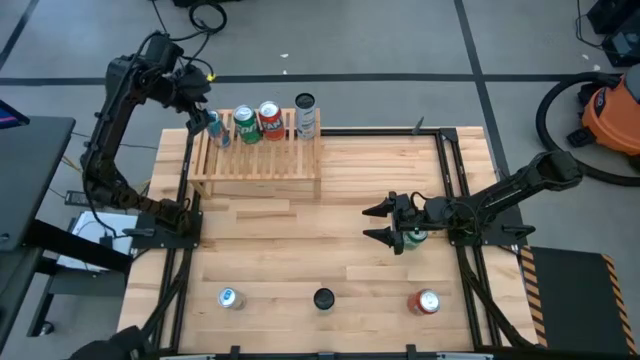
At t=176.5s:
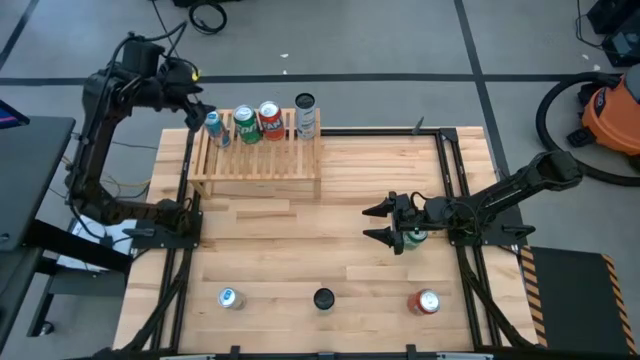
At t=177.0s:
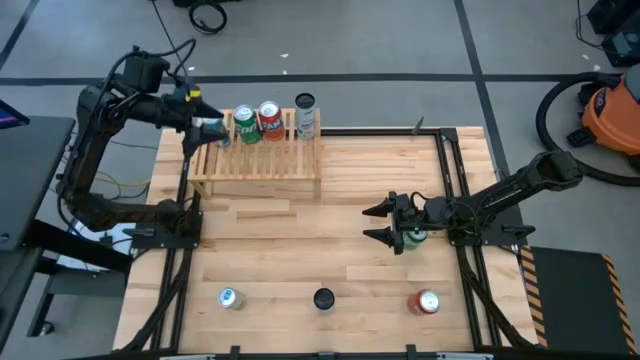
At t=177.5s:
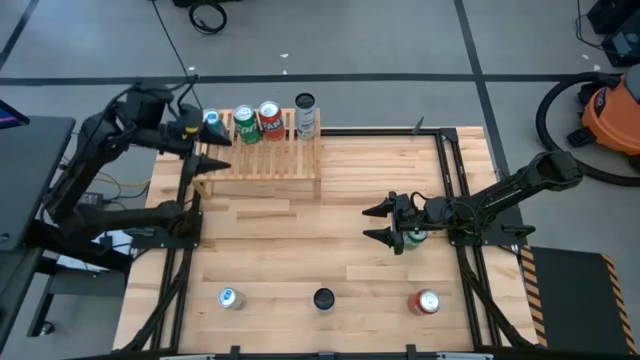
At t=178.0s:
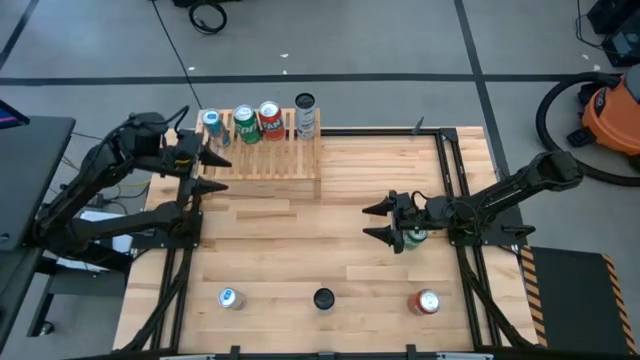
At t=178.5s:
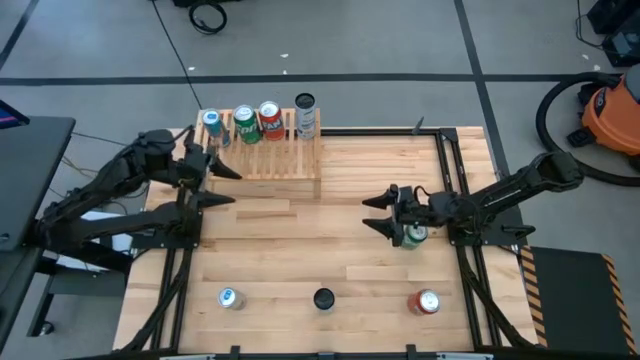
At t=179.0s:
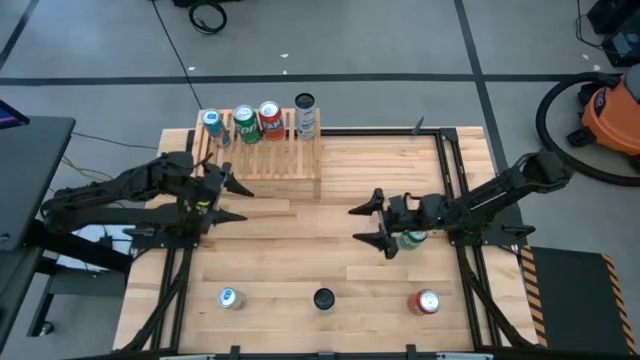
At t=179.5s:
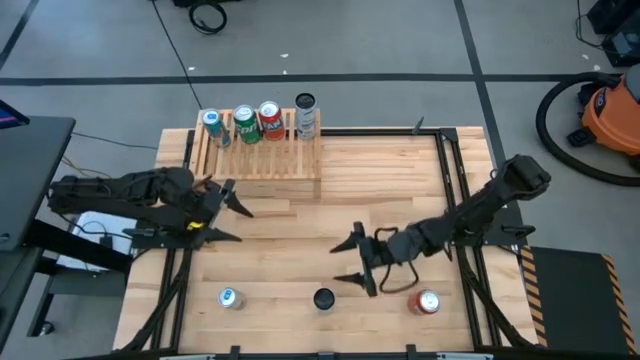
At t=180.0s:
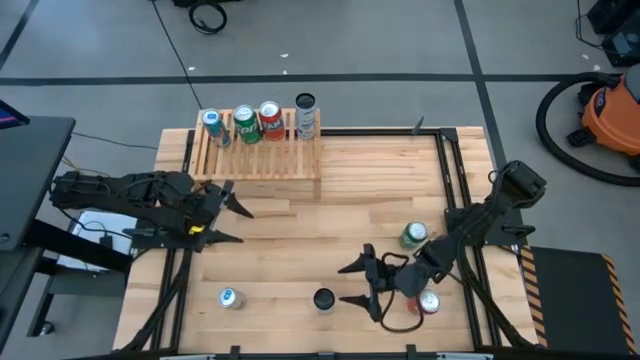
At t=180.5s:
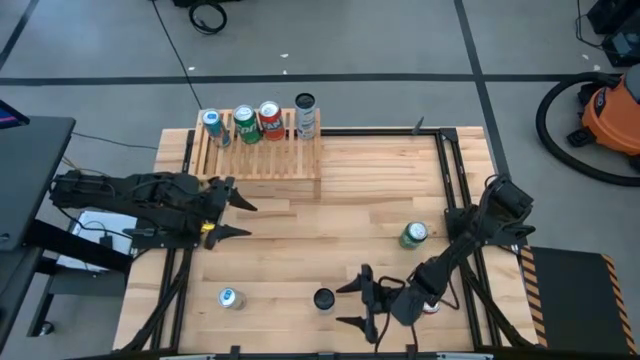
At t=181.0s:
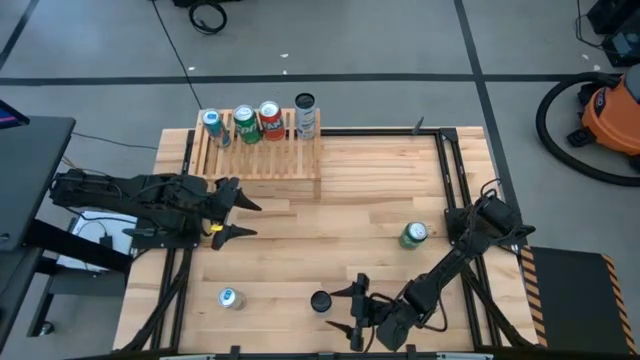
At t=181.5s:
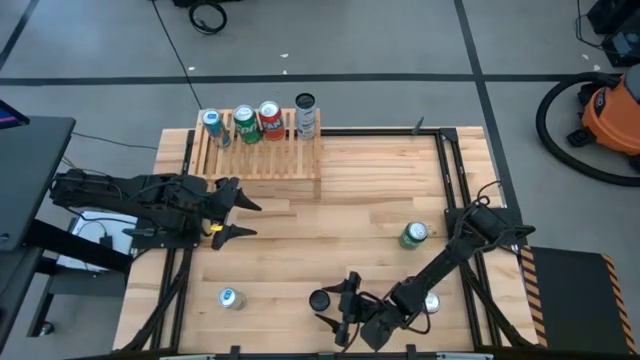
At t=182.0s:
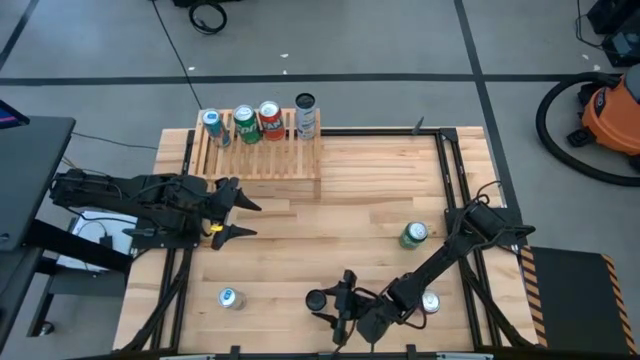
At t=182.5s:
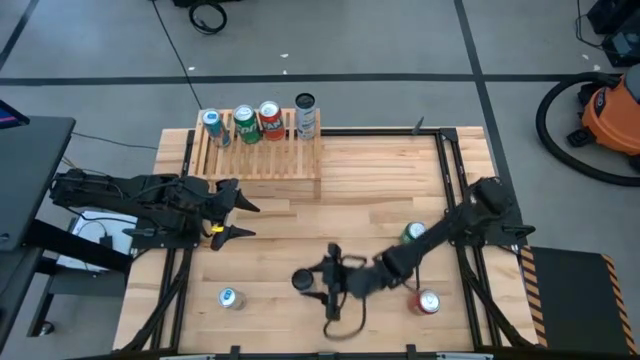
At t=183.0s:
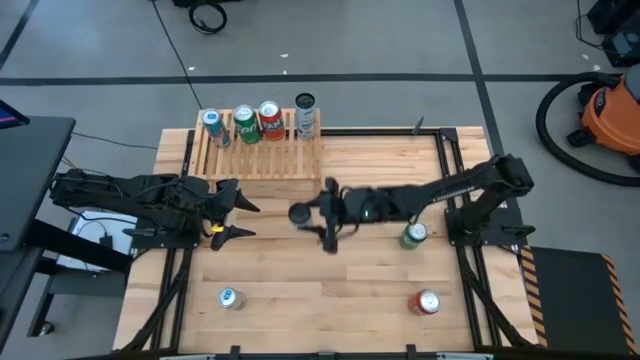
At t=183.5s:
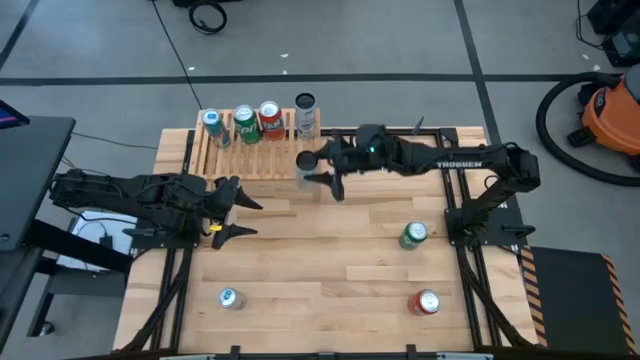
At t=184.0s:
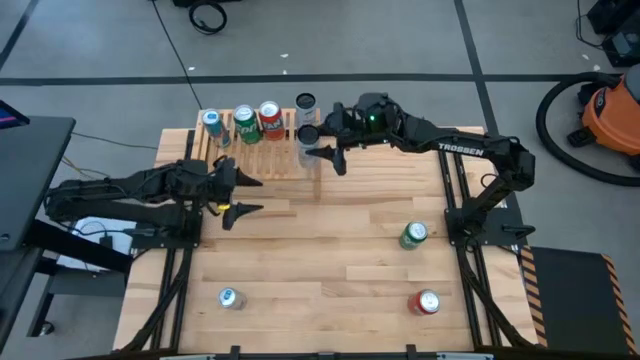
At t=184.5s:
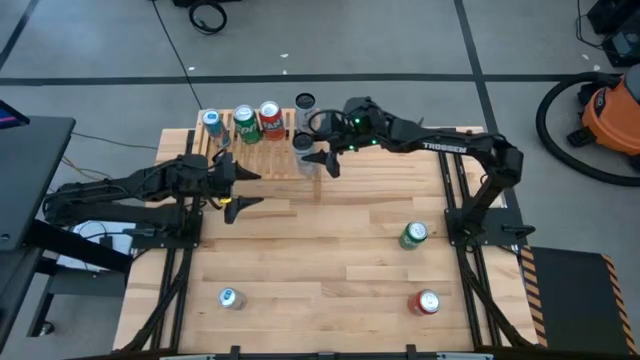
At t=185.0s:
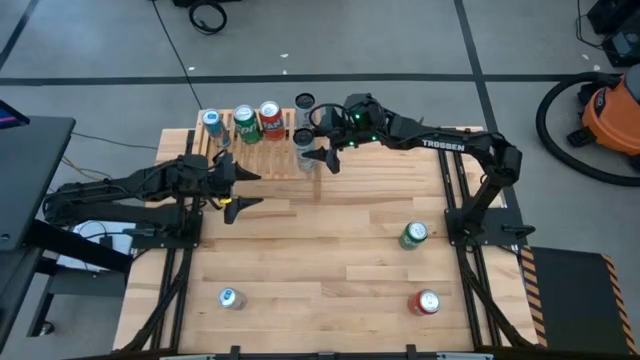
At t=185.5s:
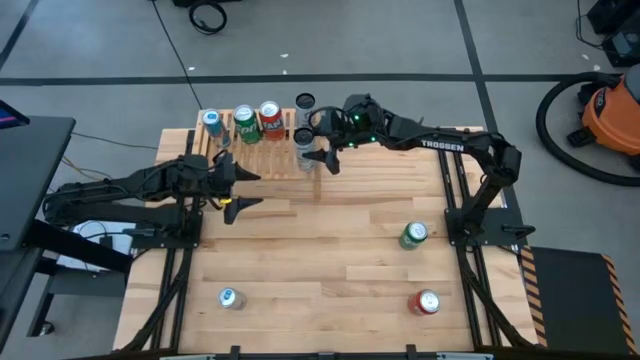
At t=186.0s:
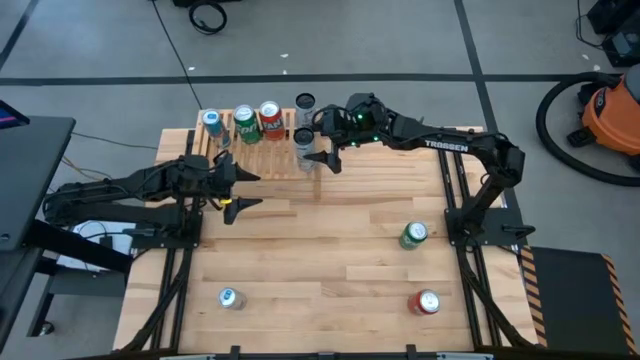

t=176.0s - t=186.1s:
Task: Place canned beverage on shelf
Put the white-blue soda can on the shelf

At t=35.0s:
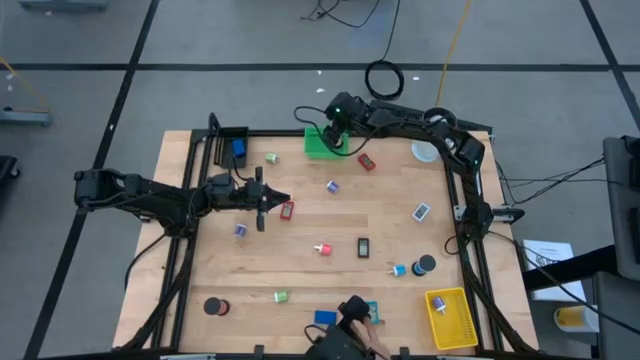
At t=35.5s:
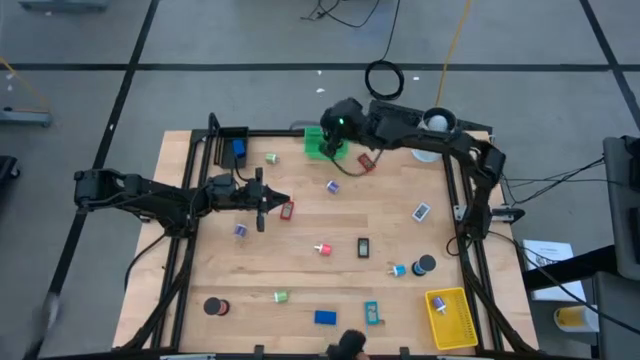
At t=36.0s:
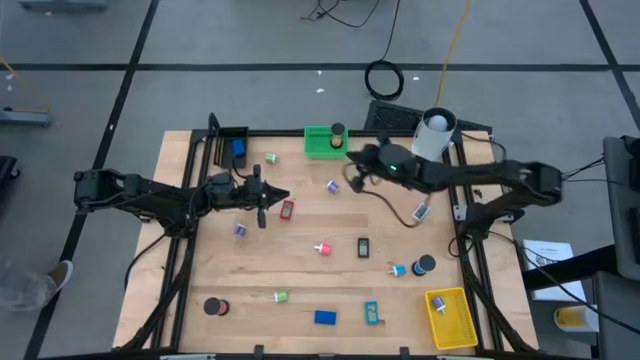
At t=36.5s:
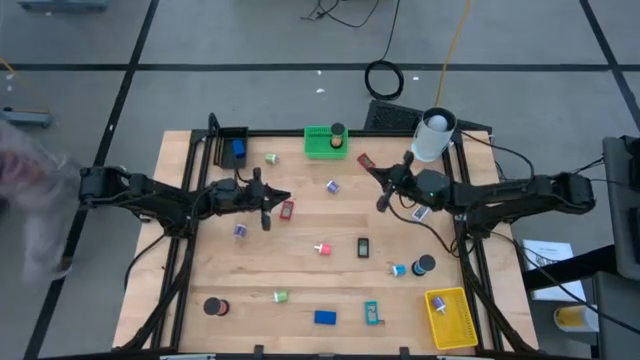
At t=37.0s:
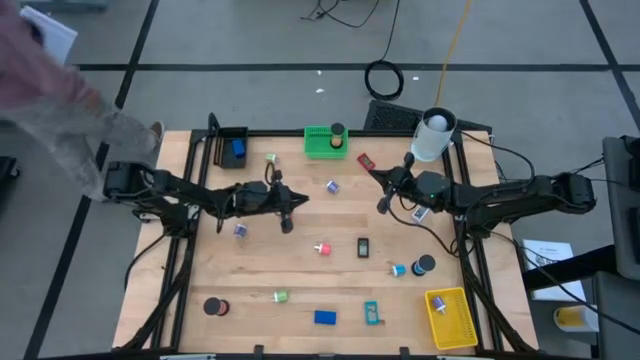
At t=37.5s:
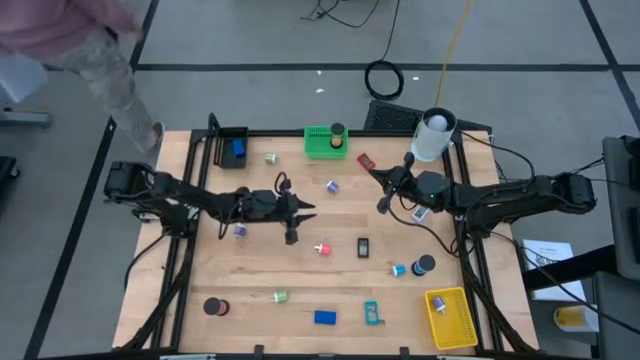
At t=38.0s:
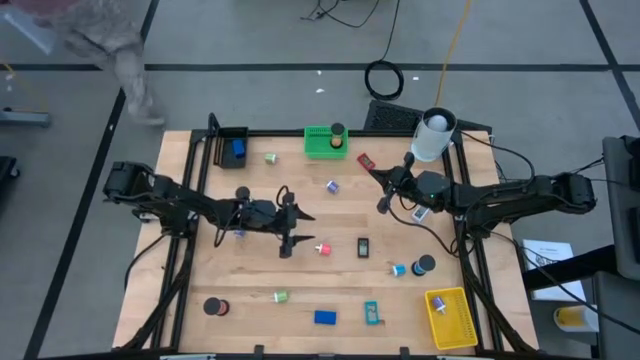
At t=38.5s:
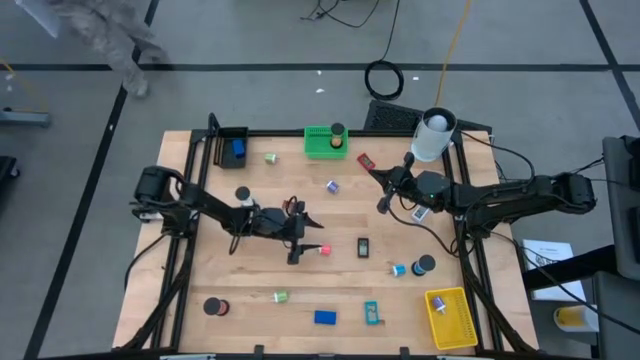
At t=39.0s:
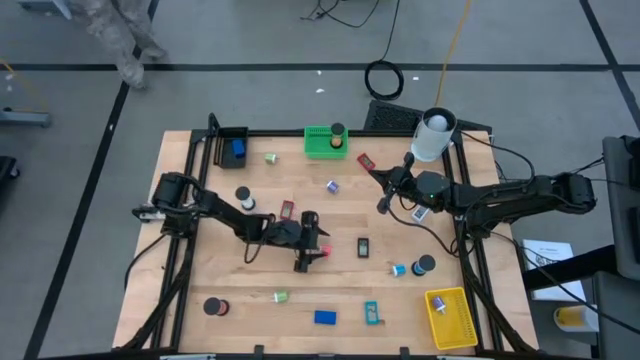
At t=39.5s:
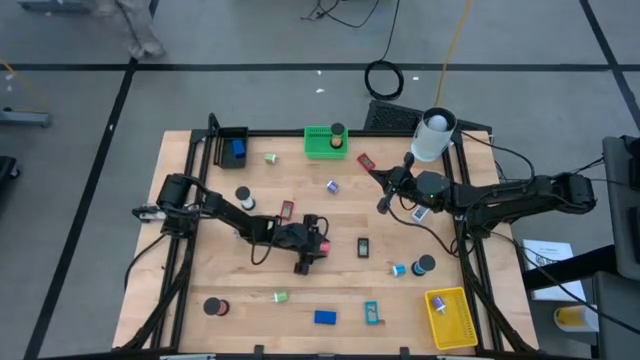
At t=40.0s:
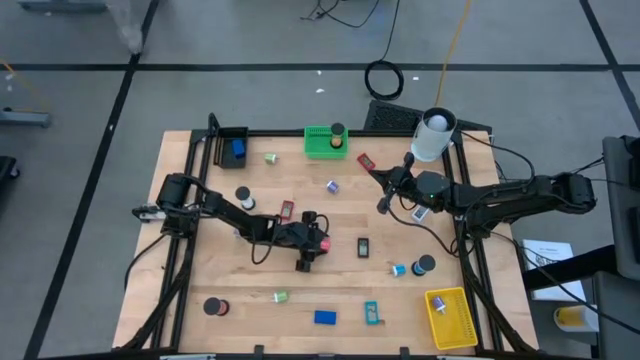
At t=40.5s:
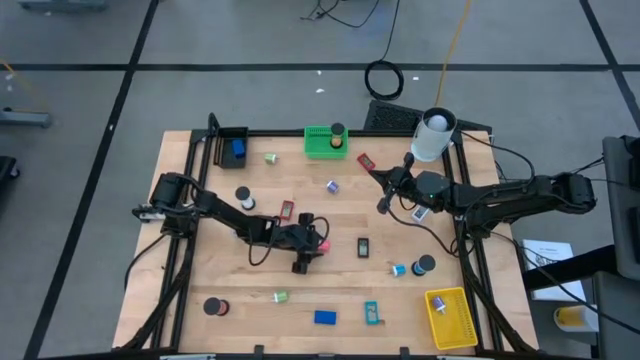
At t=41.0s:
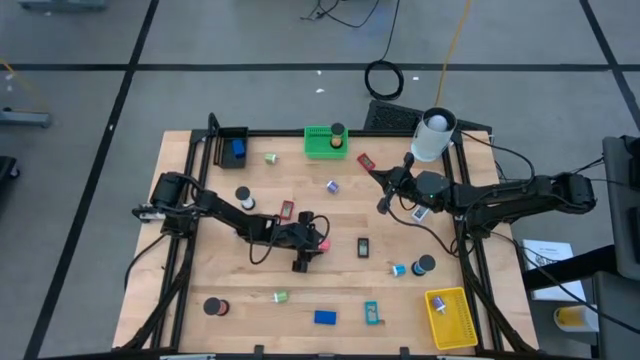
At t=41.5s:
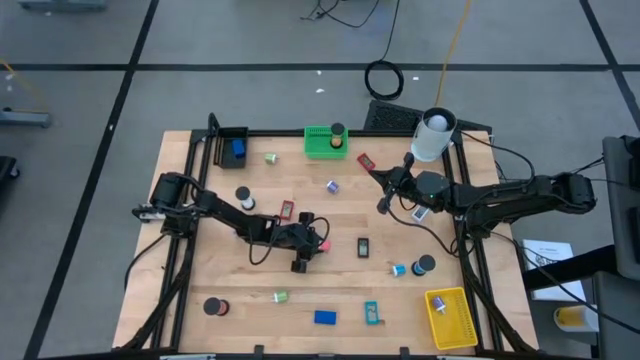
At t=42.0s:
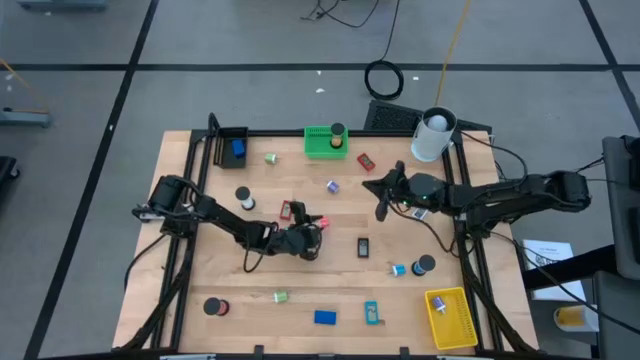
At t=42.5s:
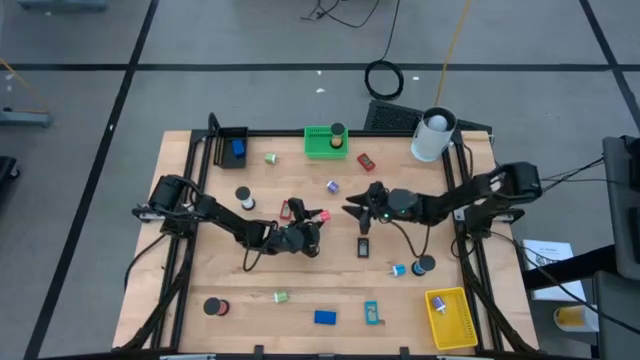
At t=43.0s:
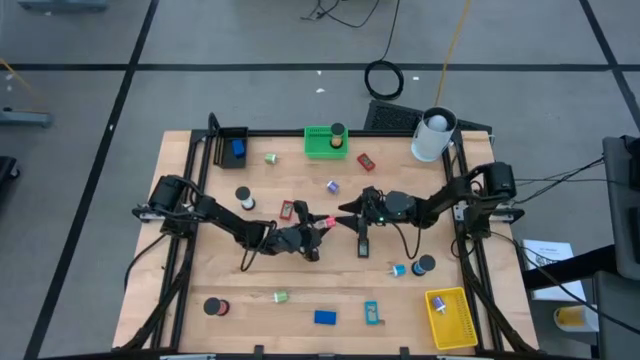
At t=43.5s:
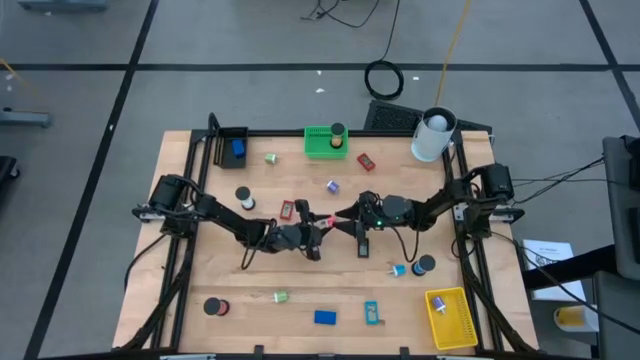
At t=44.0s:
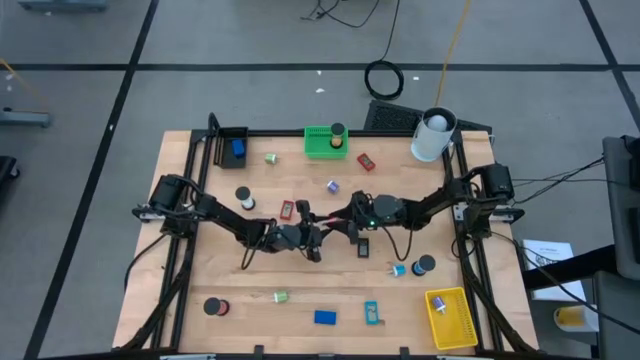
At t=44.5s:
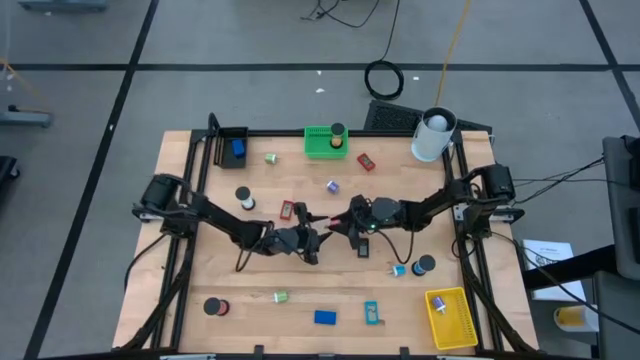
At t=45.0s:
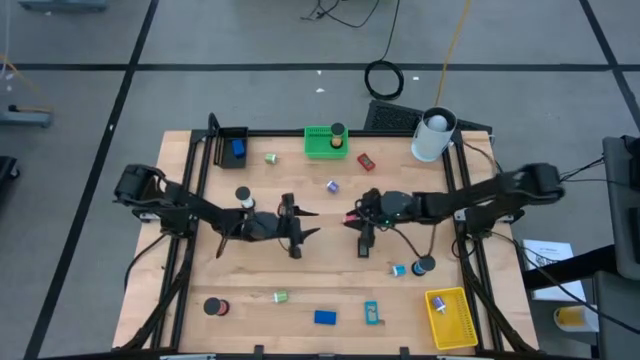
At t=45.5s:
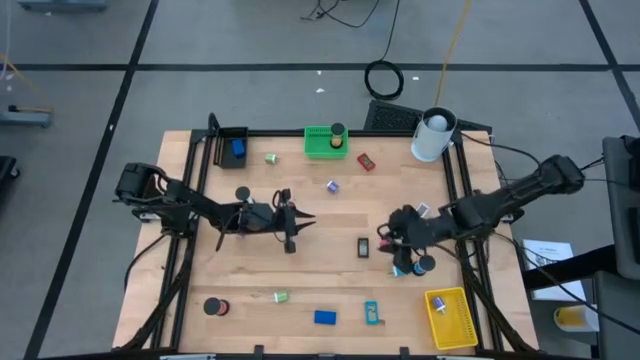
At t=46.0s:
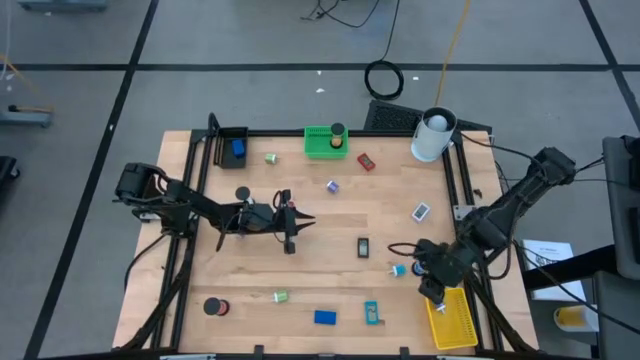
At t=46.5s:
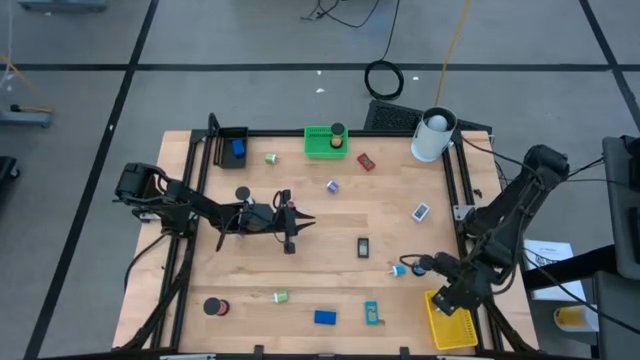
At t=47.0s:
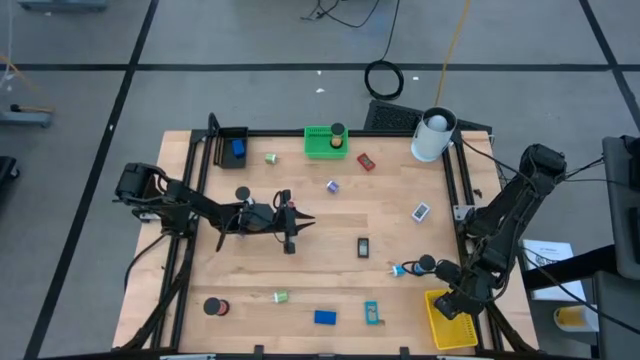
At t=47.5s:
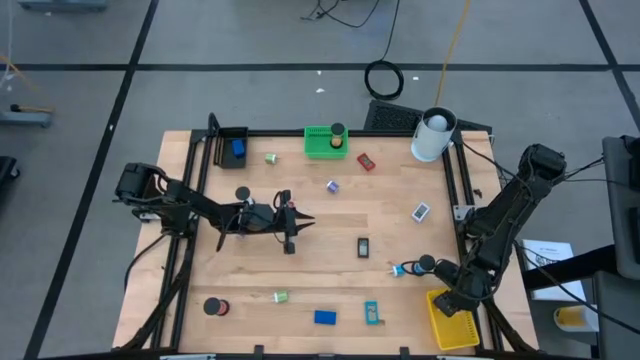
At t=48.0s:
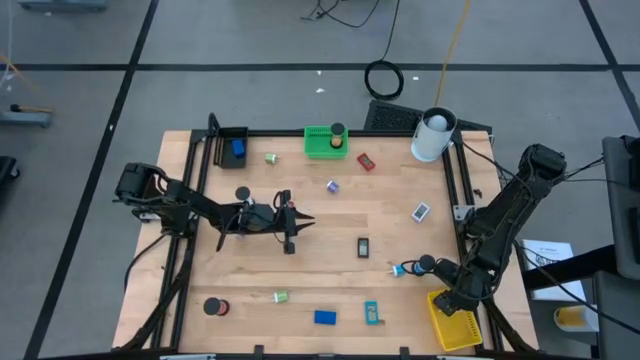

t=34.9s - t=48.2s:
Task: Pick & Place Office items
Put the pink charger adapter into the yellow basket
